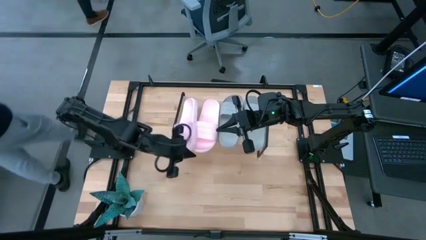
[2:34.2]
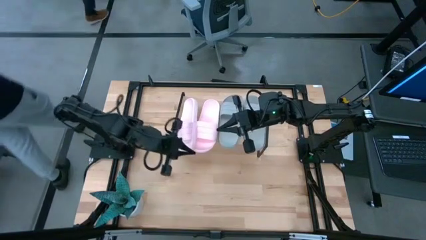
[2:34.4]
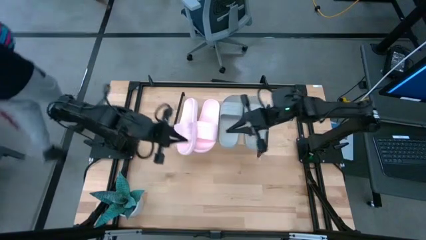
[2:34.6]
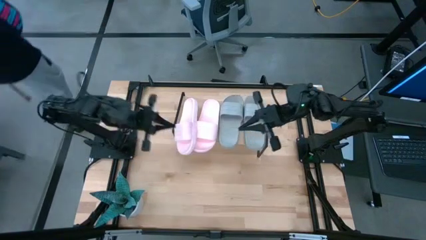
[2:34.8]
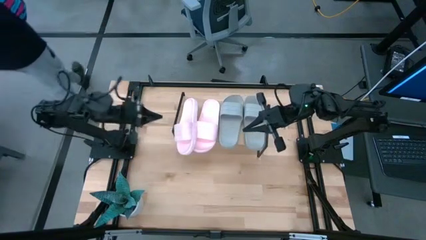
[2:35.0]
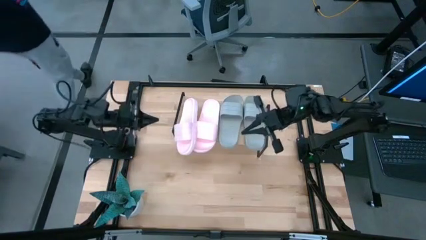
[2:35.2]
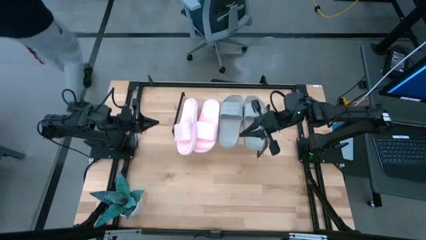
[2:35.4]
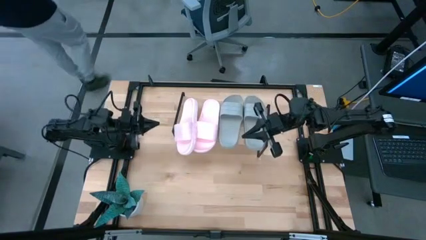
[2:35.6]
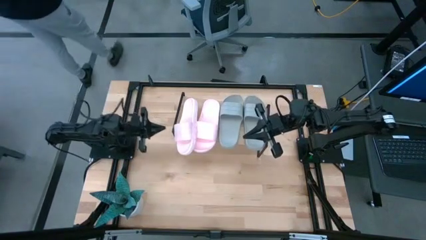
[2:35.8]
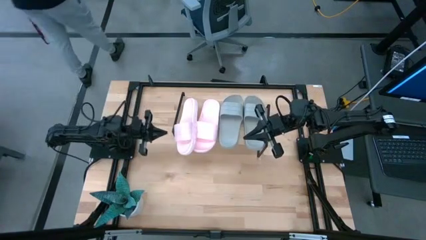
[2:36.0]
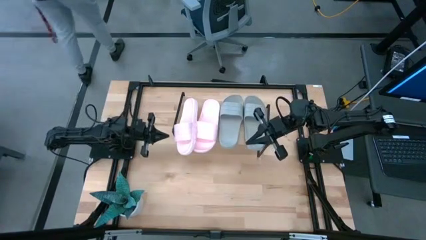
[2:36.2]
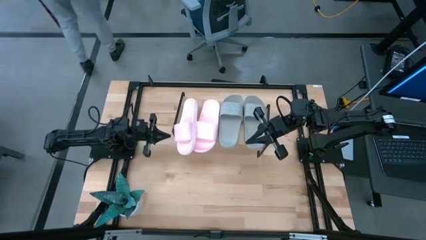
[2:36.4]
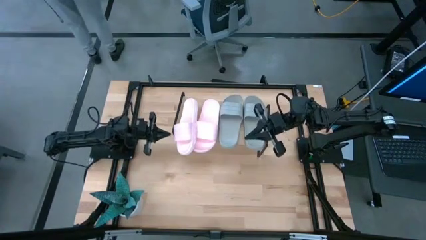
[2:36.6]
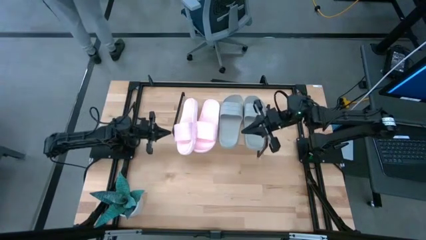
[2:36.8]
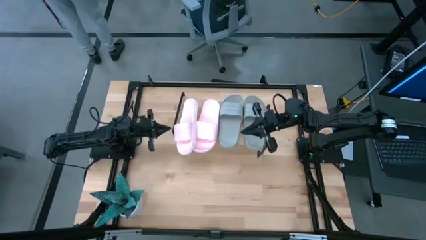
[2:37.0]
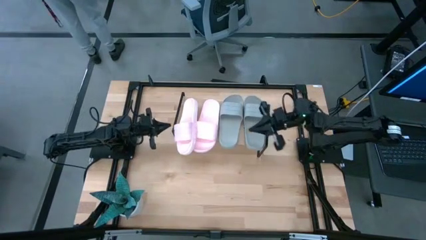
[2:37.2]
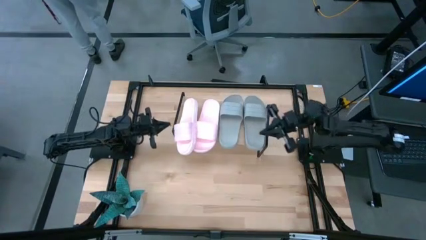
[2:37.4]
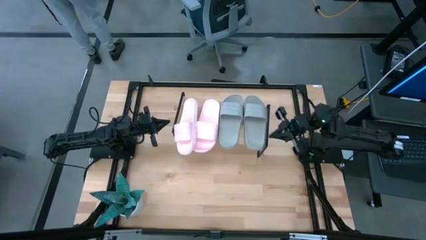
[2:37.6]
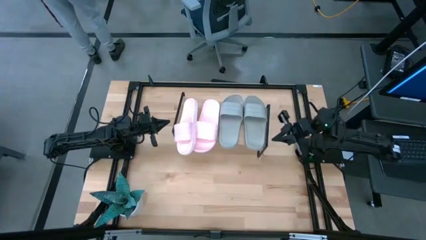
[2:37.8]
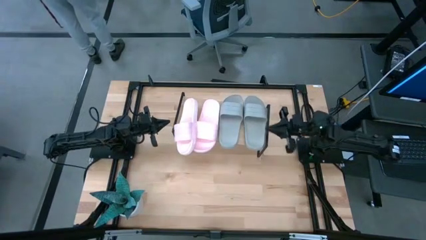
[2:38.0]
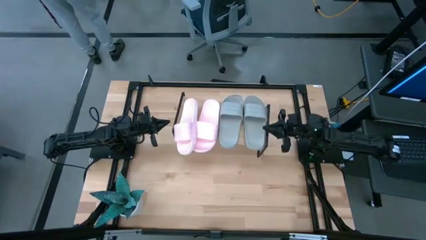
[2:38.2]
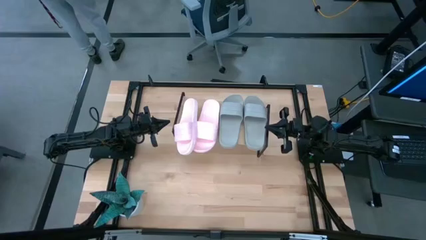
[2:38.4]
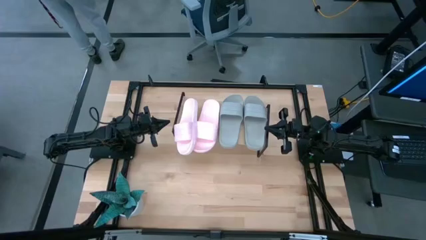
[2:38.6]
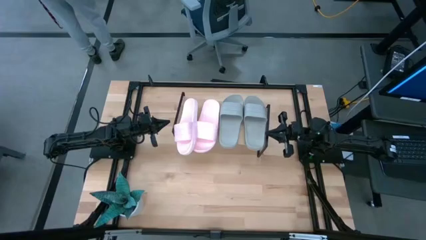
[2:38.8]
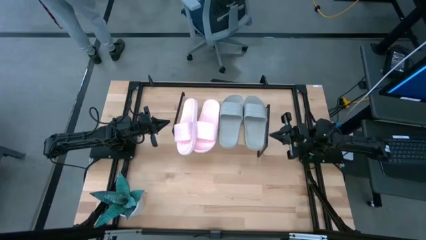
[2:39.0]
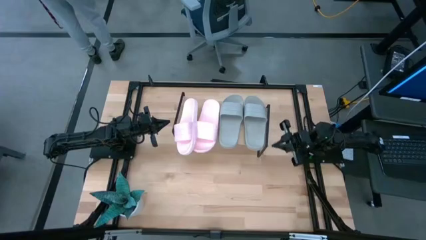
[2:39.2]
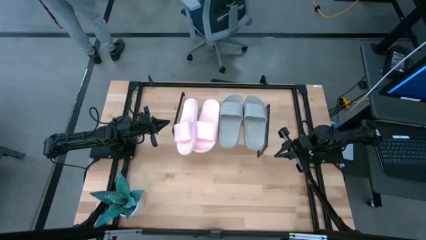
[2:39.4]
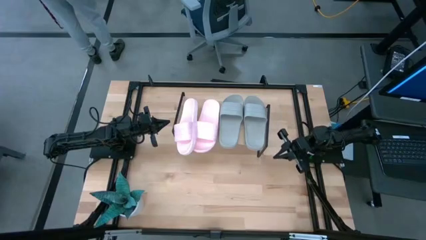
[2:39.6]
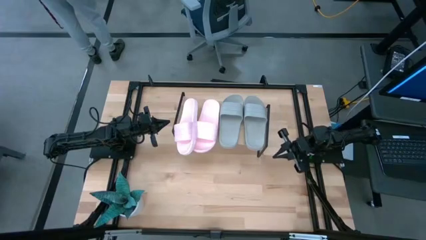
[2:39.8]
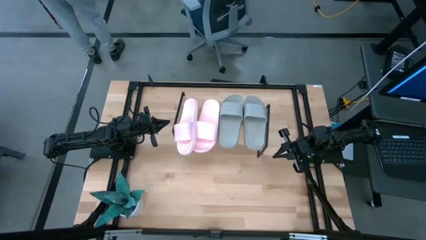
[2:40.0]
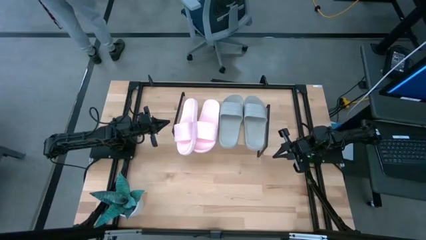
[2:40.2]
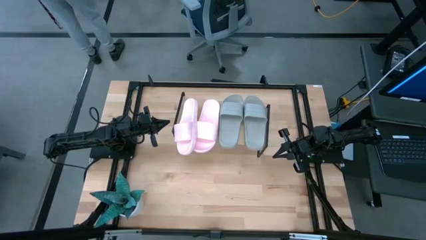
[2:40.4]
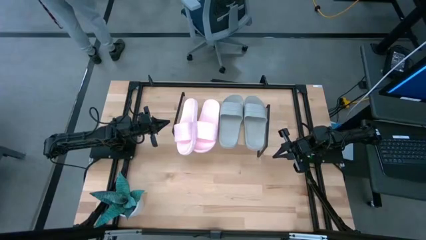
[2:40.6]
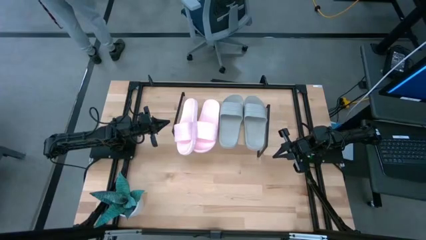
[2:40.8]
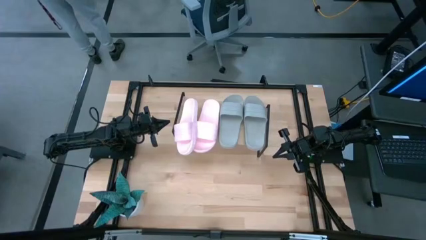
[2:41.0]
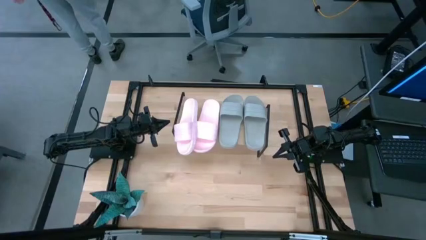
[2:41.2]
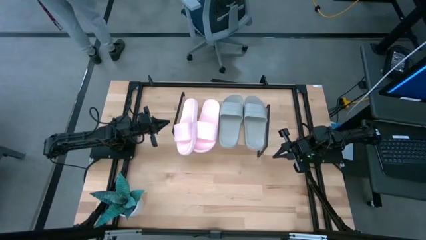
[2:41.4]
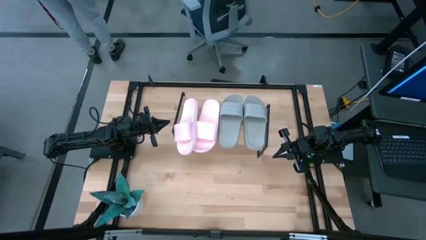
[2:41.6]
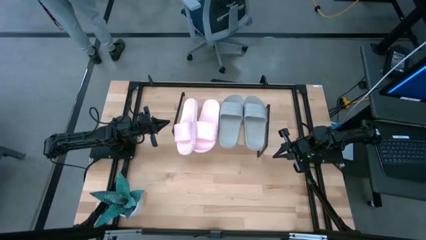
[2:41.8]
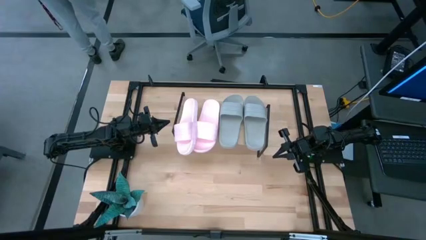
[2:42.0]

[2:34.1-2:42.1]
Task: Pick and place slides into the shelf
Return to Home Position

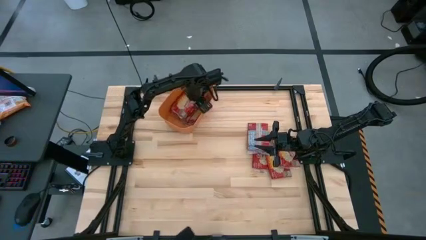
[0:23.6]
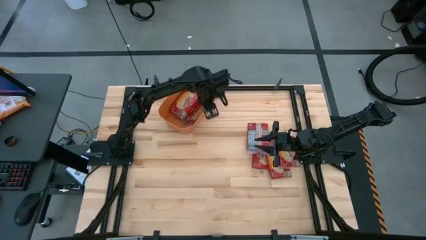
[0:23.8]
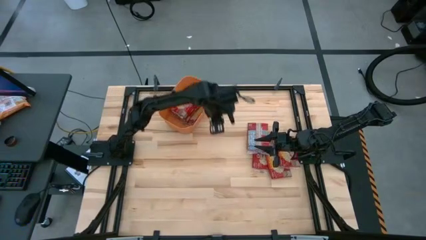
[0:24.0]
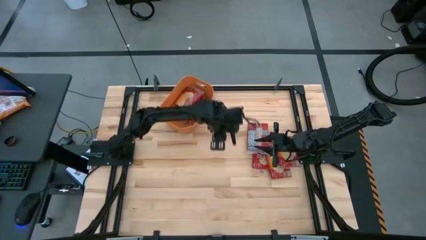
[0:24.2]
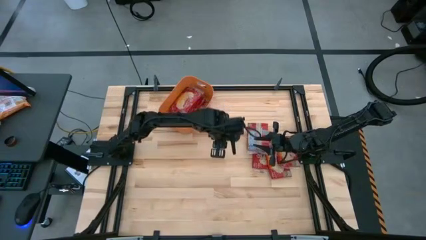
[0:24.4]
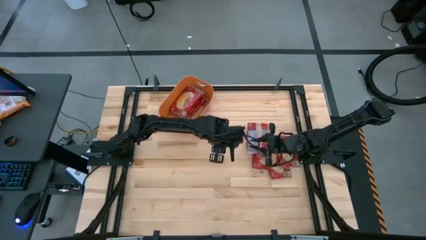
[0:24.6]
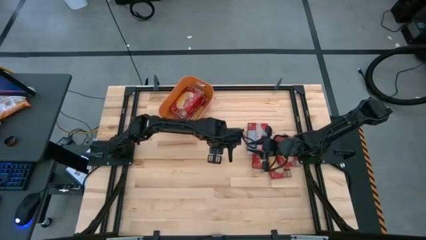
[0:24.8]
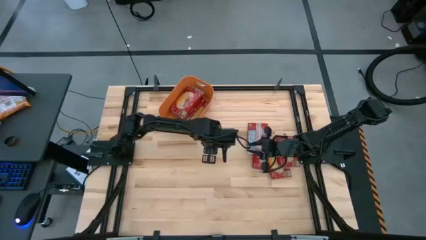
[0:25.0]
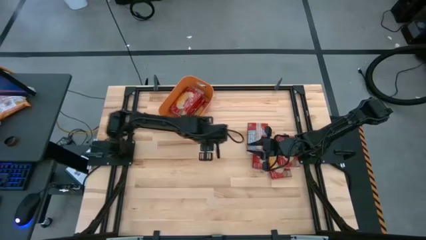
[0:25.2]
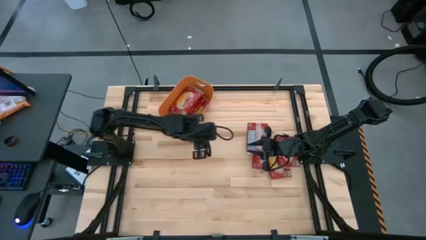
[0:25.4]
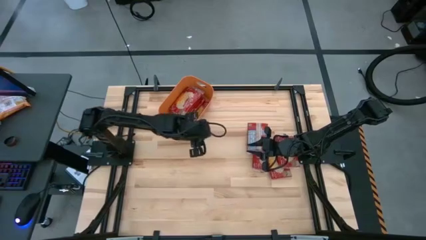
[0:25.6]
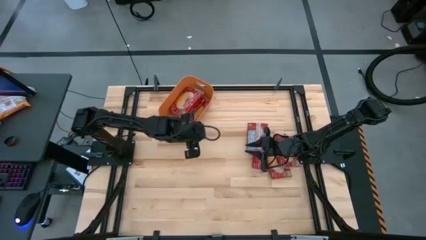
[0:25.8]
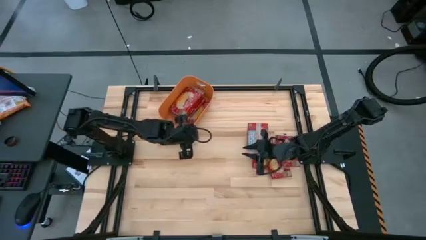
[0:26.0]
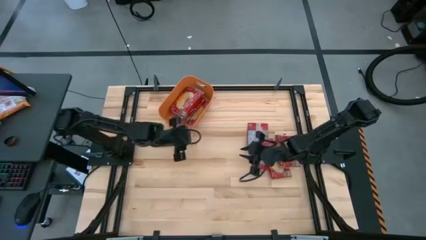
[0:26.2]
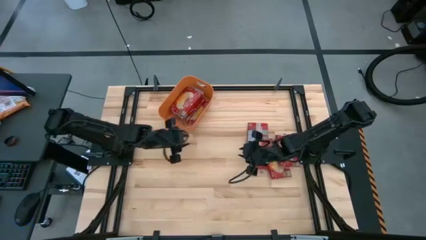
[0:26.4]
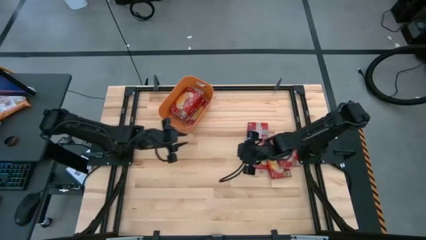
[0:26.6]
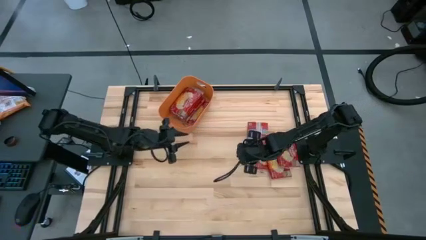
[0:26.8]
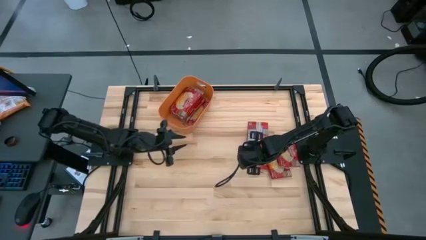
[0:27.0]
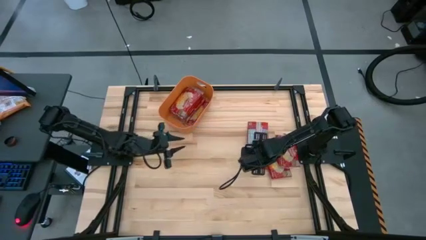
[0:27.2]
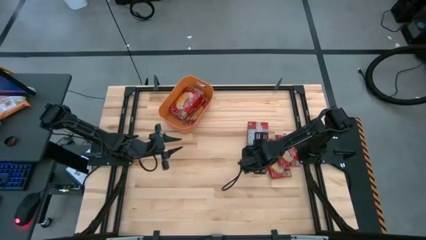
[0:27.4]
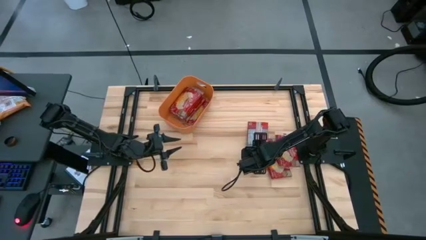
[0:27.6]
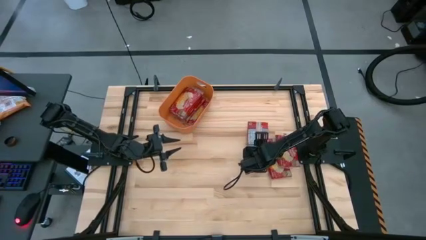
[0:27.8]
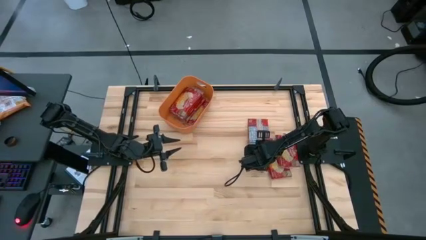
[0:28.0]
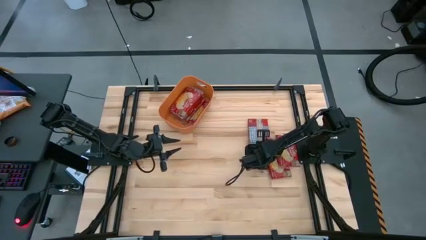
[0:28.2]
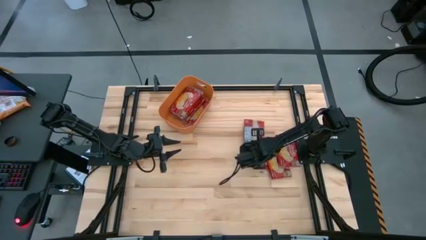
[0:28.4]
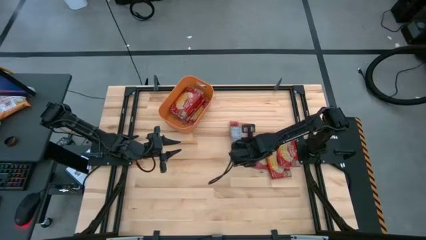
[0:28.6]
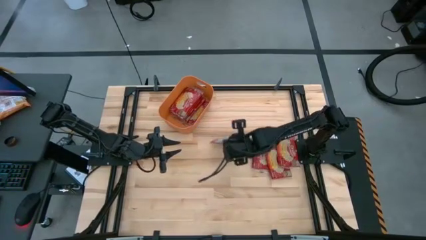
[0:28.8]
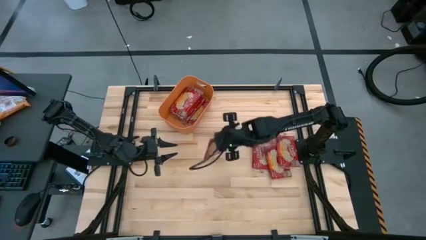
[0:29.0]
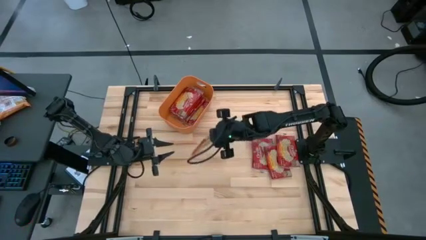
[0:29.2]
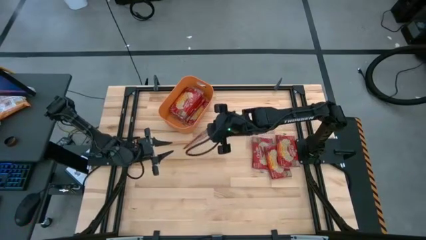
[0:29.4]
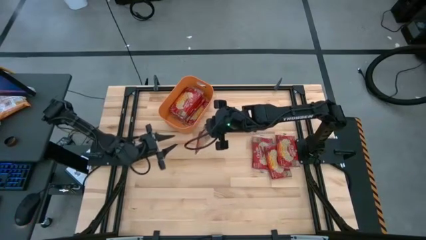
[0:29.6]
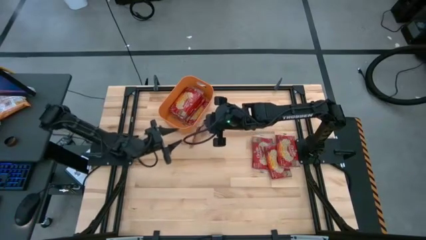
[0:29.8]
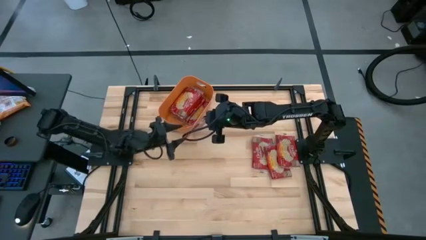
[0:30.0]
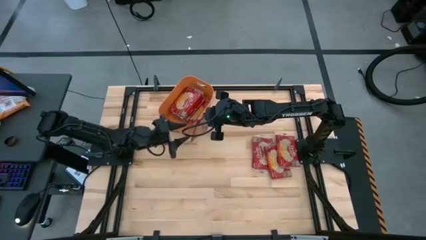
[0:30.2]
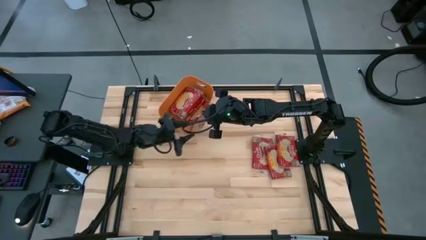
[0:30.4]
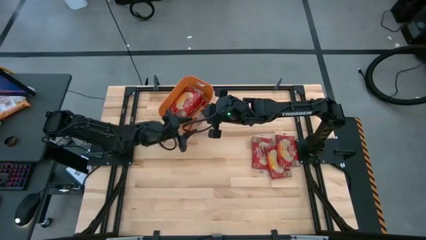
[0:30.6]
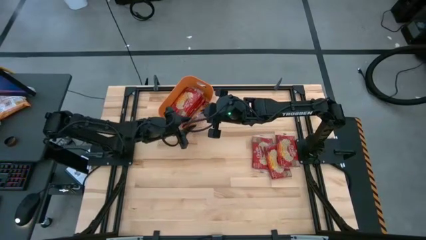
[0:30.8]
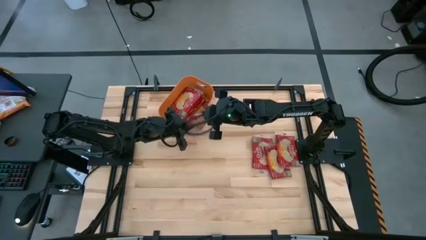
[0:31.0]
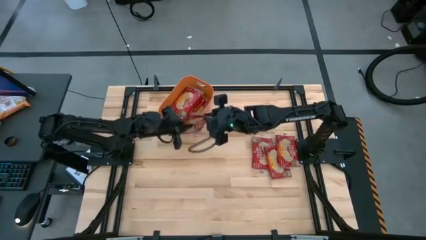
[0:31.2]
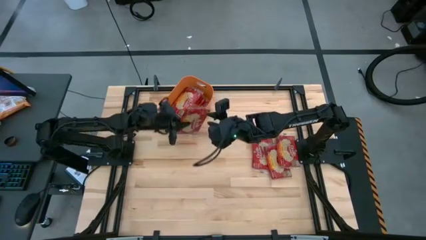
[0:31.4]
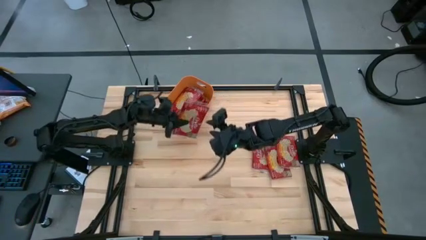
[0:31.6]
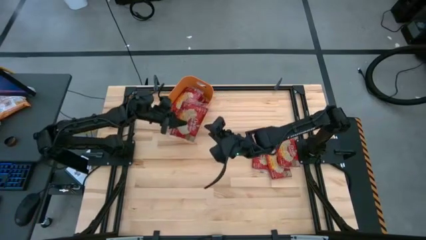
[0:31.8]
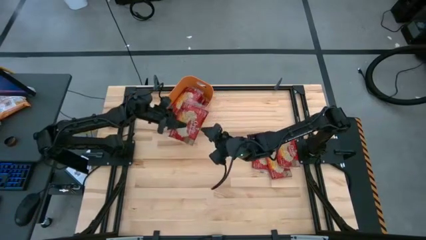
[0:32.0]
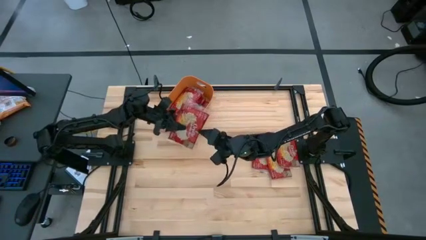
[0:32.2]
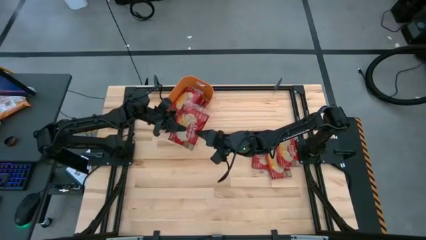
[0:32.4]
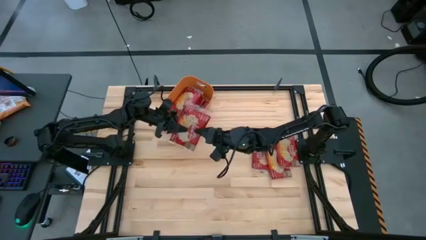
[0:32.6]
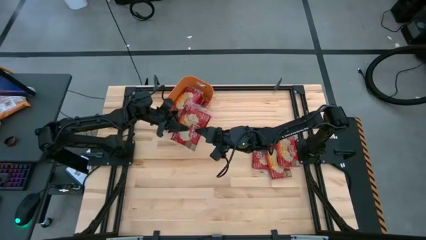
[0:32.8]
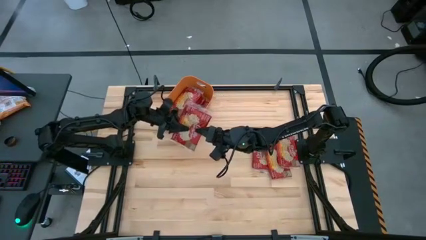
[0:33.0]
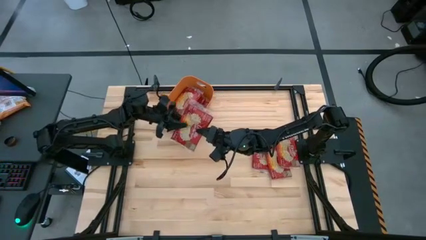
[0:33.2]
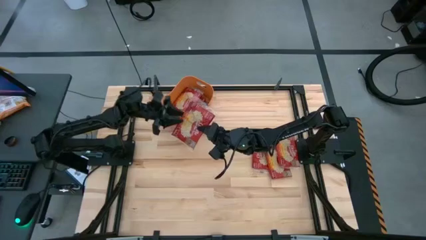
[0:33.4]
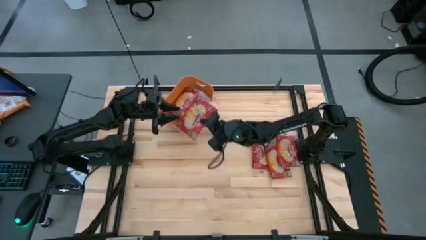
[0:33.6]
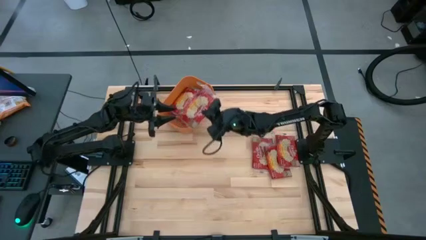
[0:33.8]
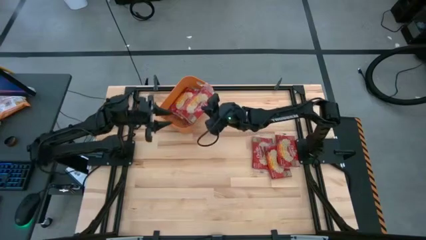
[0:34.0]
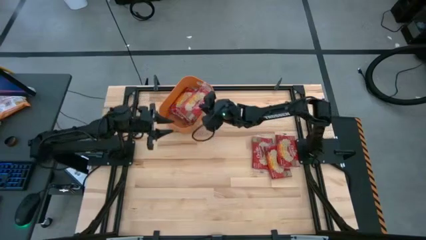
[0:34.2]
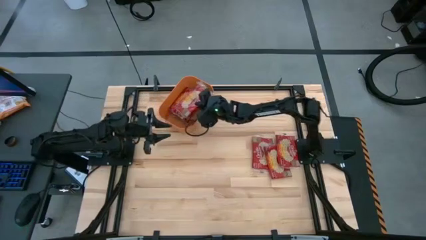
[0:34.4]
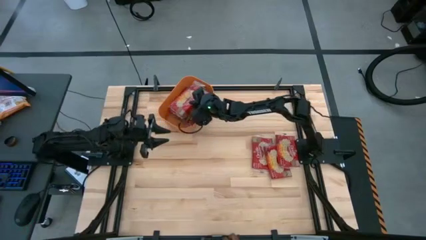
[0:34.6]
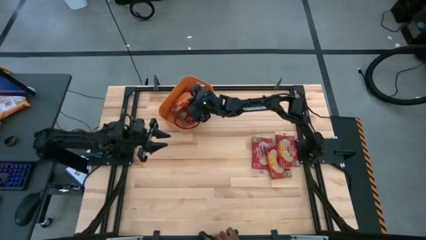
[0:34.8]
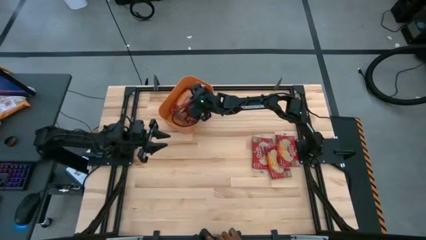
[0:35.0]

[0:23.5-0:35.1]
Task: Sort popcorn bags into baskets
Put the red popcorn bag into the orange bin
